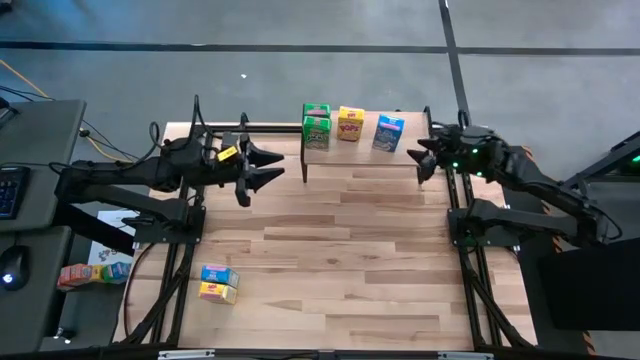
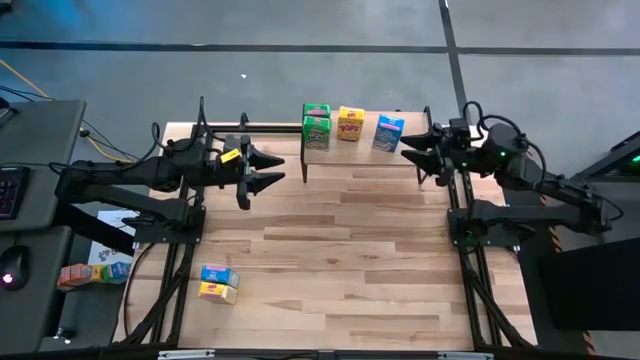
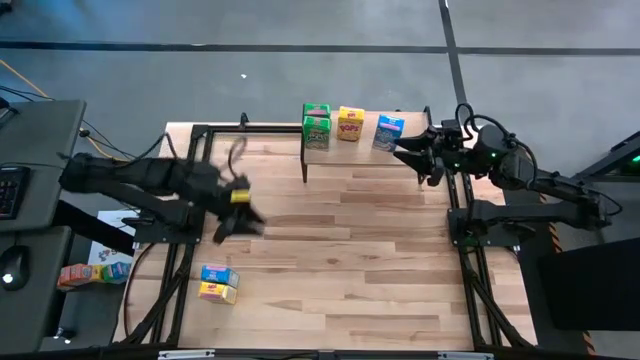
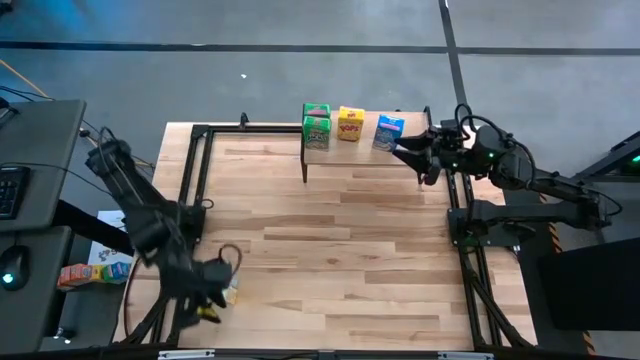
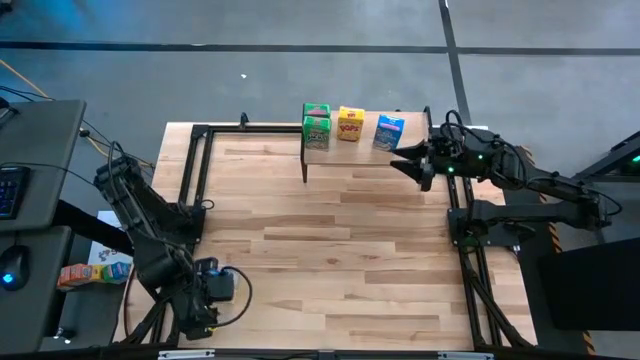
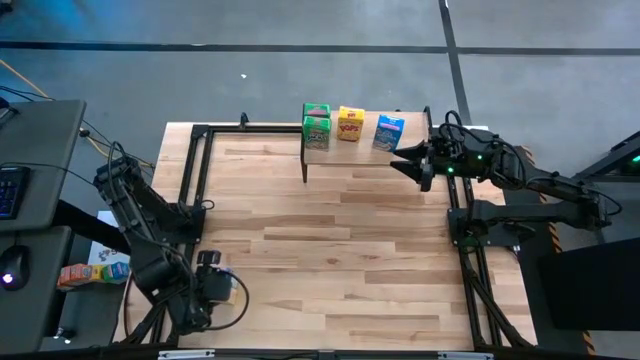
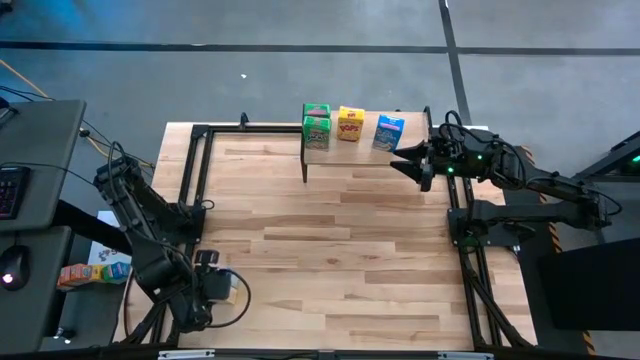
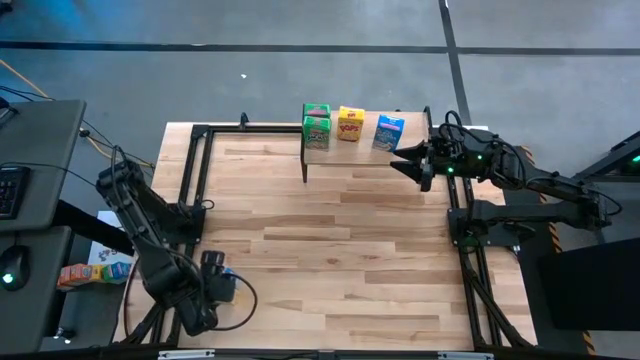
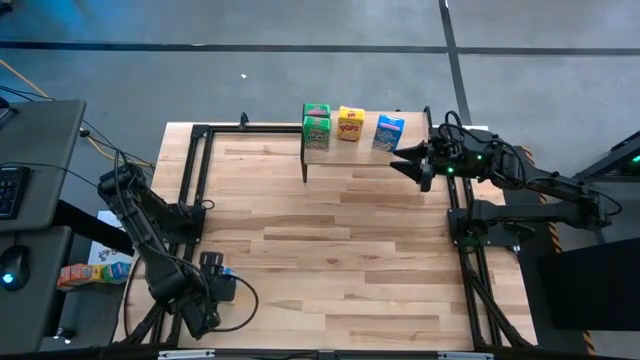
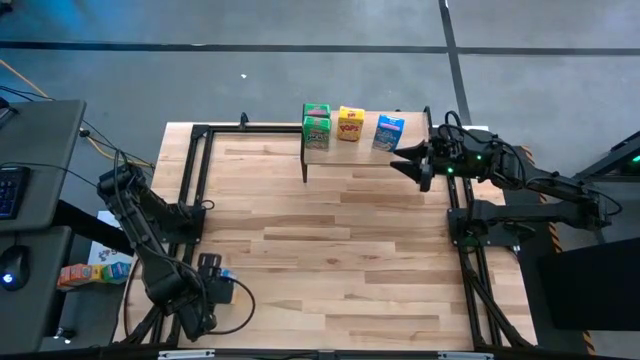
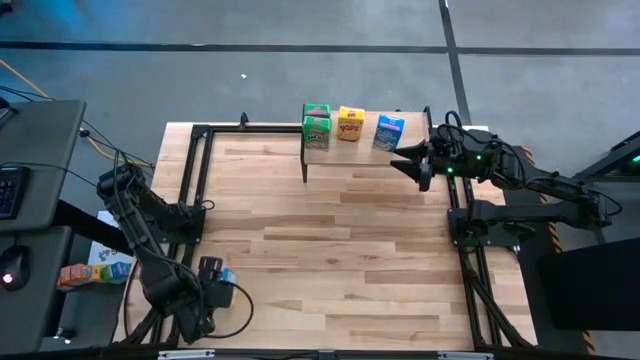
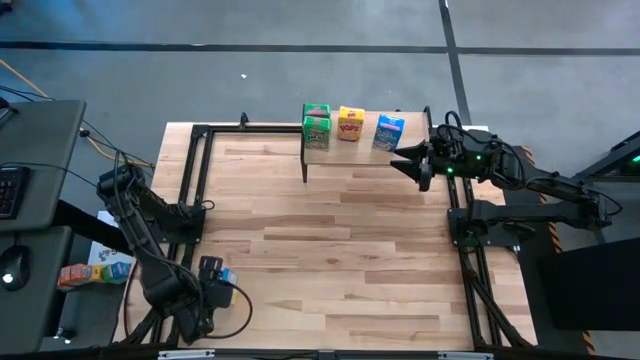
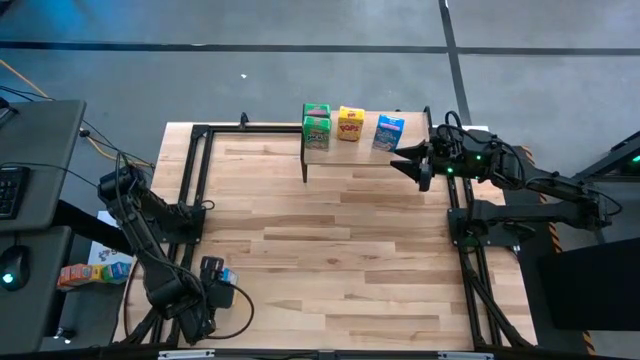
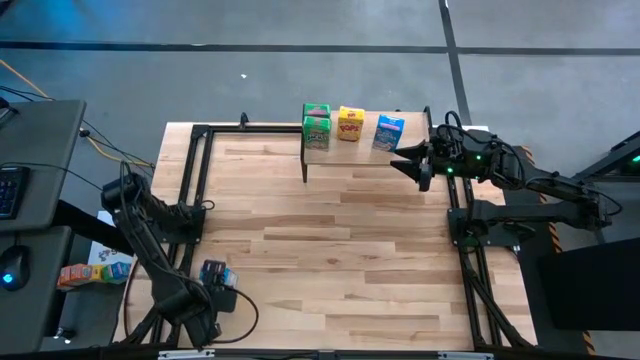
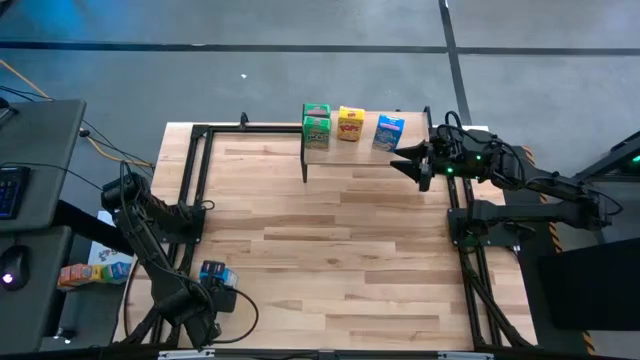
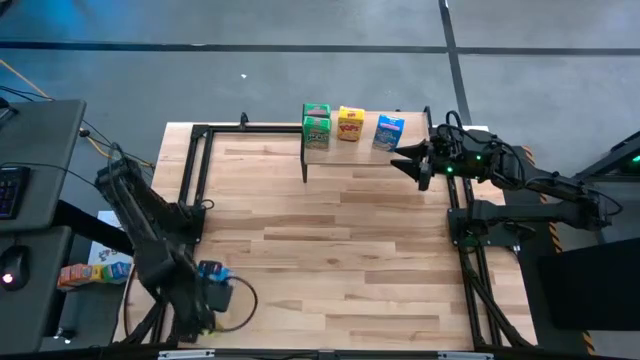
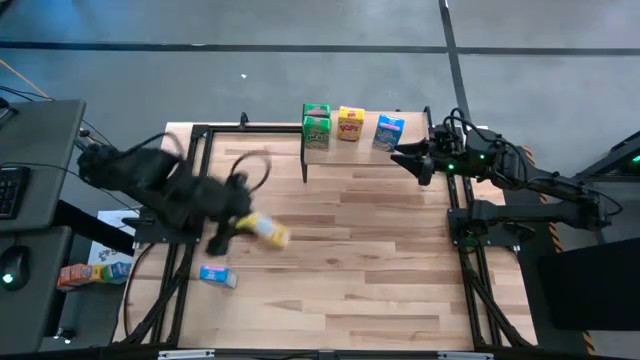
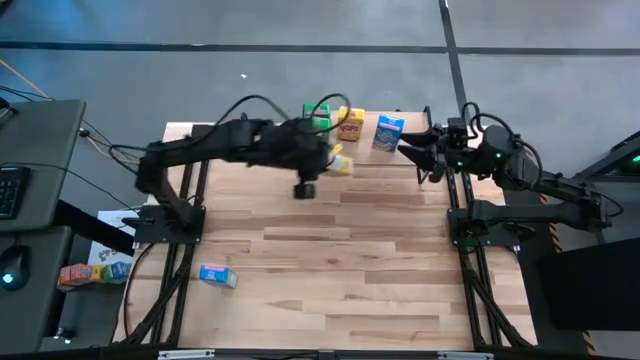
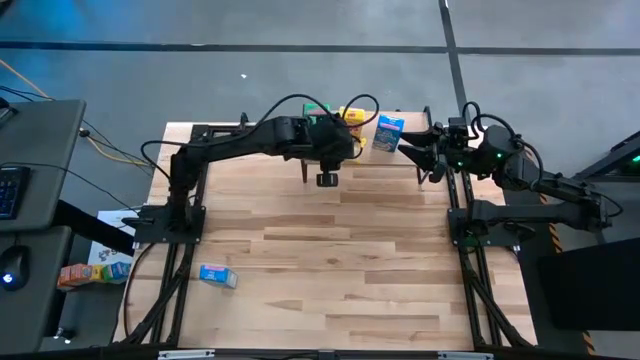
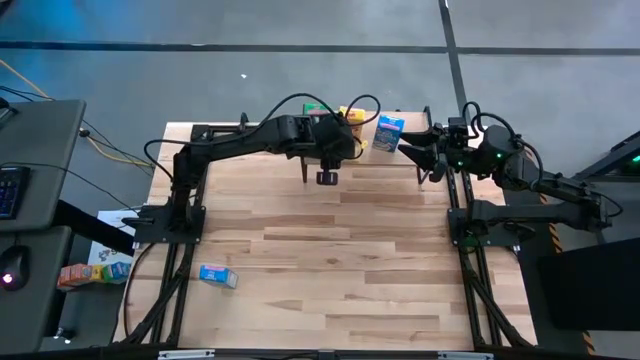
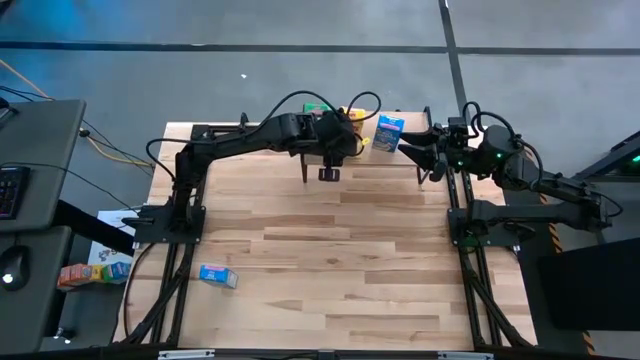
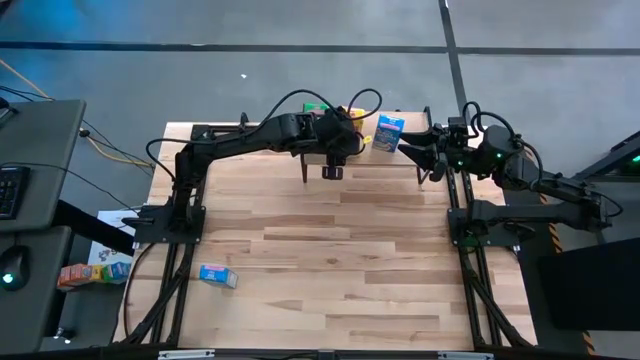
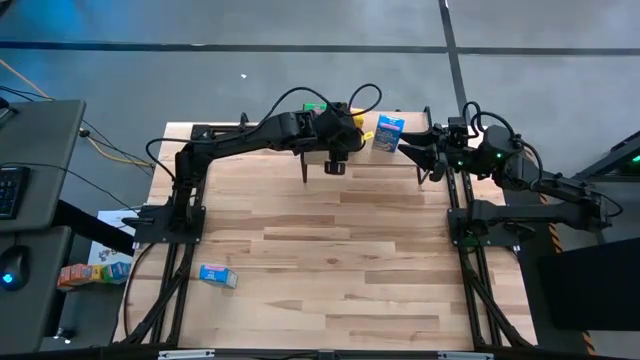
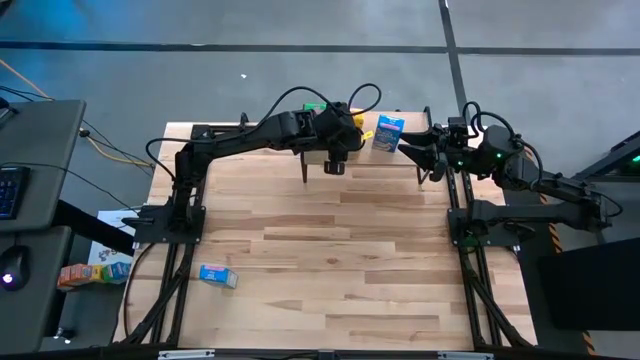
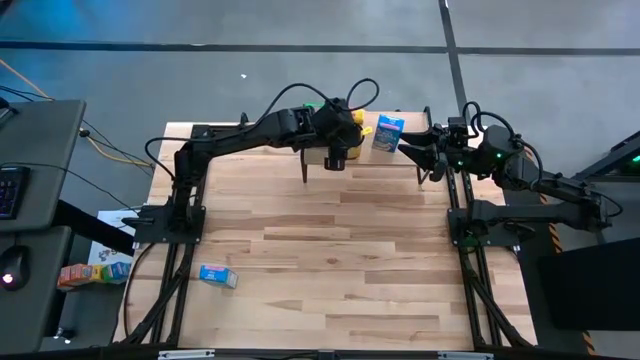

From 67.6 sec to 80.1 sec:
Task: Stack cereal on shelf
Put the yellow cereal box on the shelf

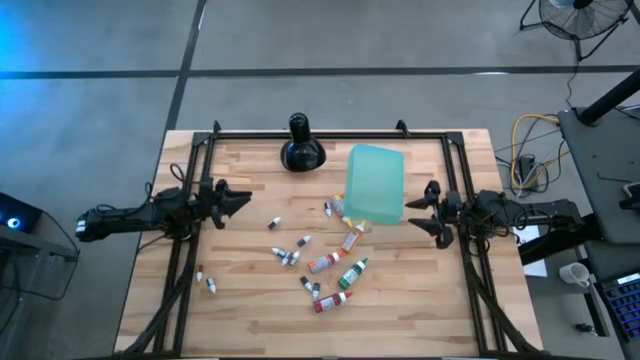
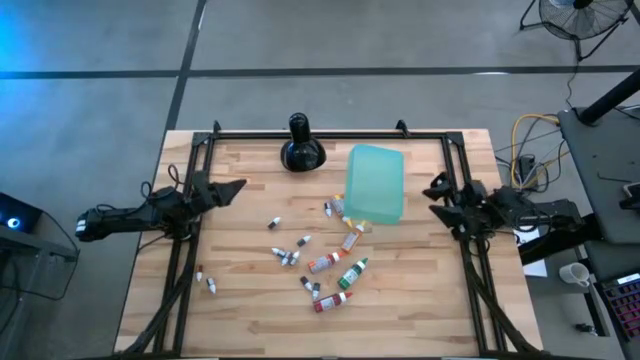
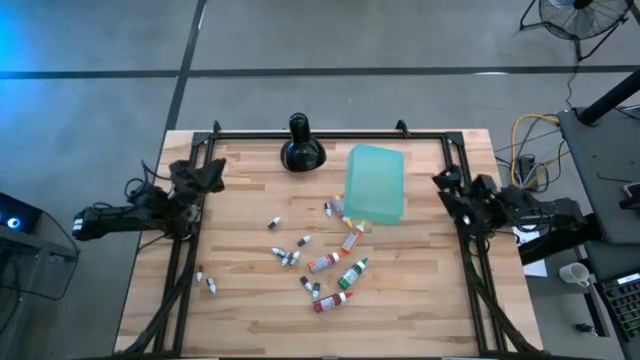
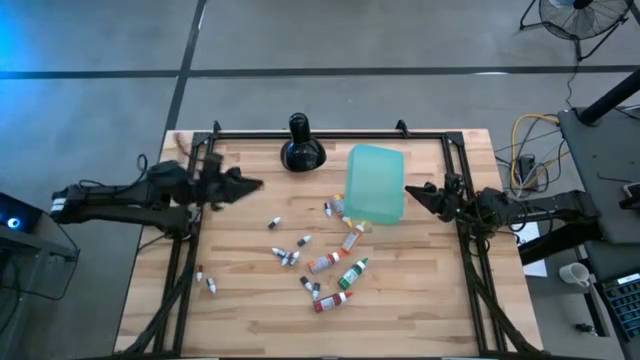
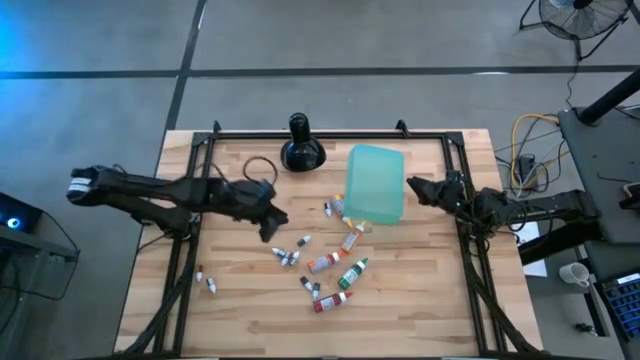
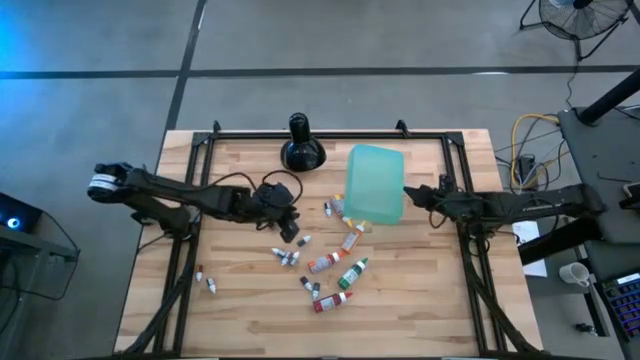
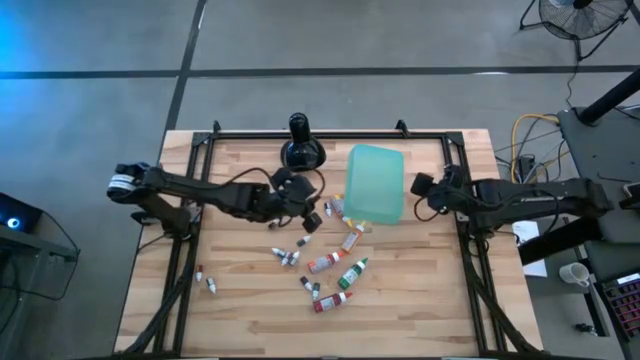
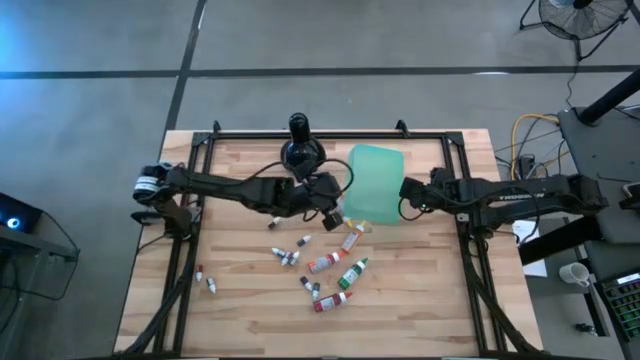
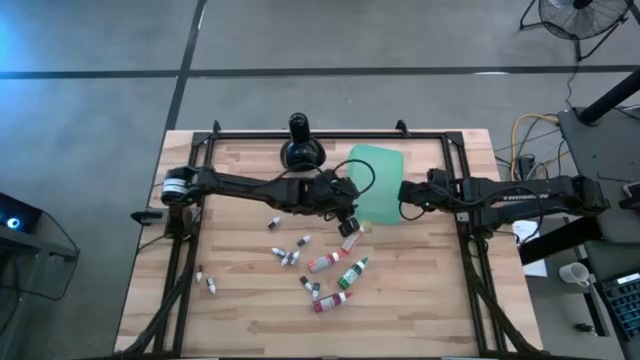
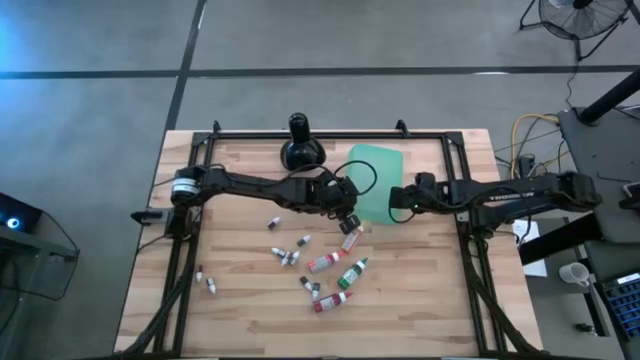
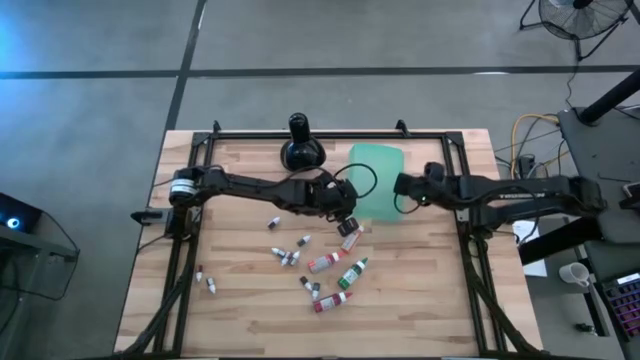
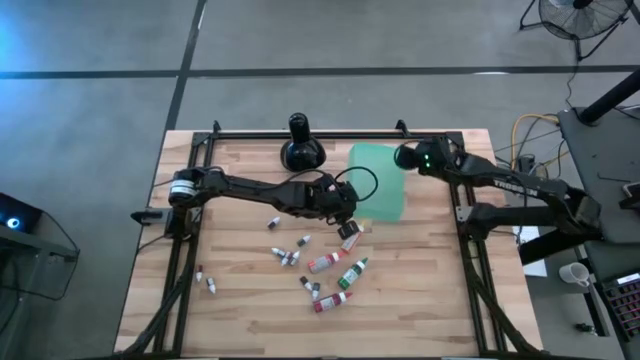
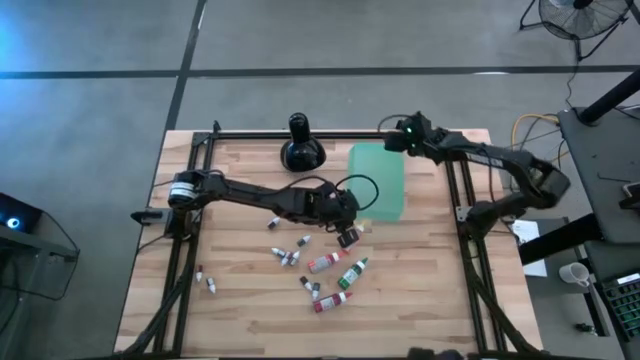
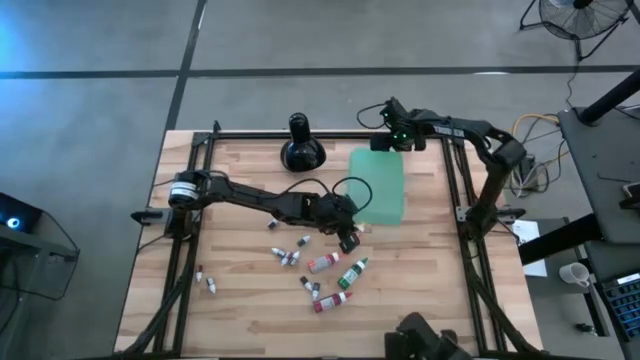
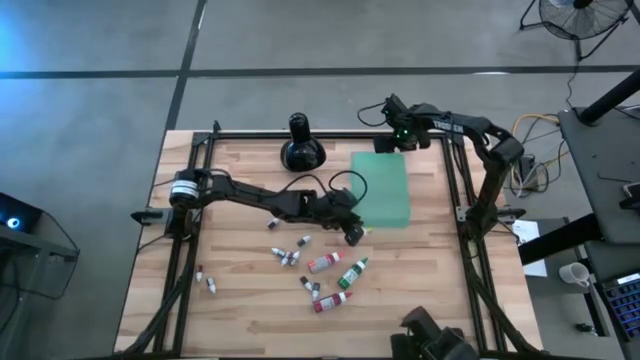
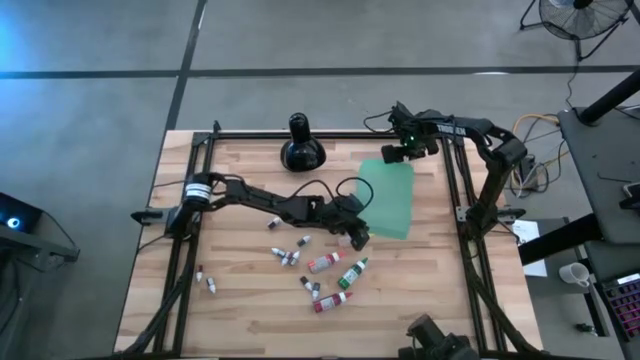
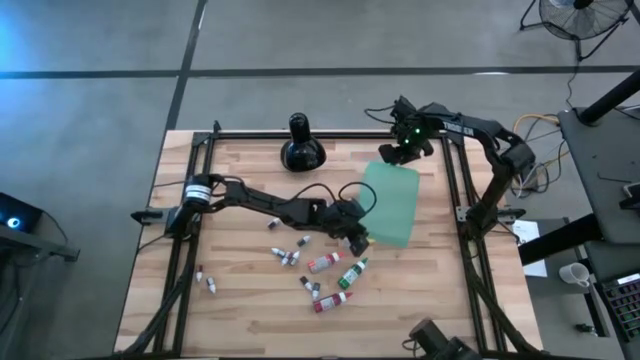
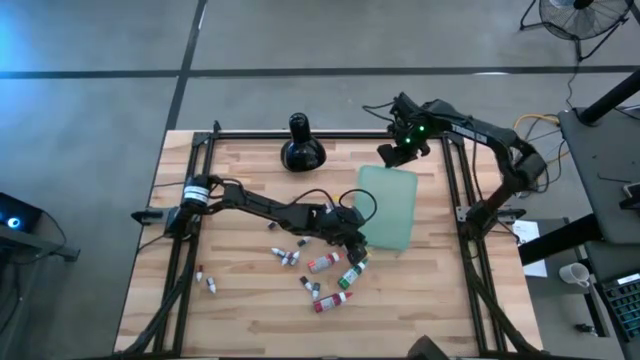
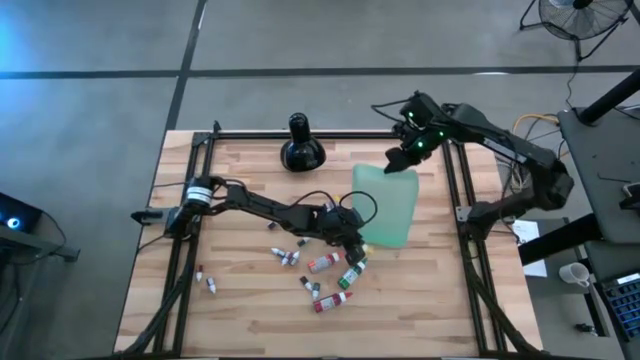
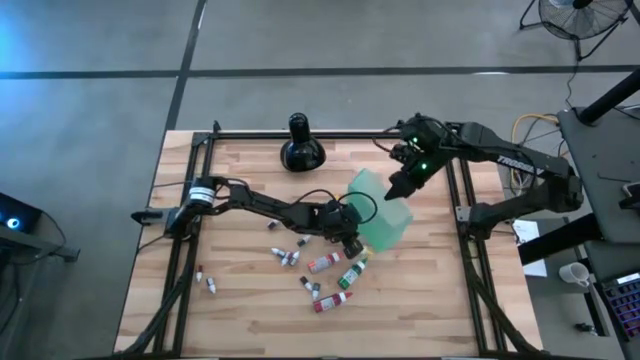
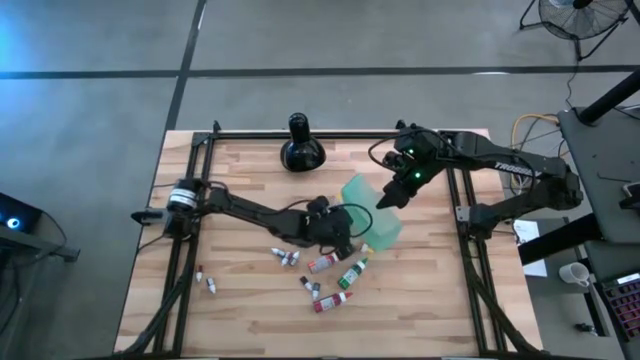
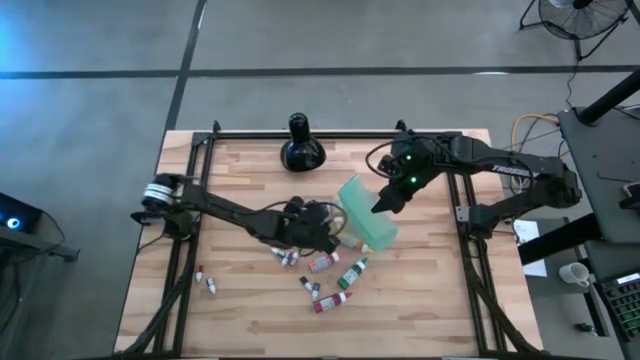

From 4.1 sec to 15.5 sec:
Task: Pick & Place food coloring
Prepare the green bin
